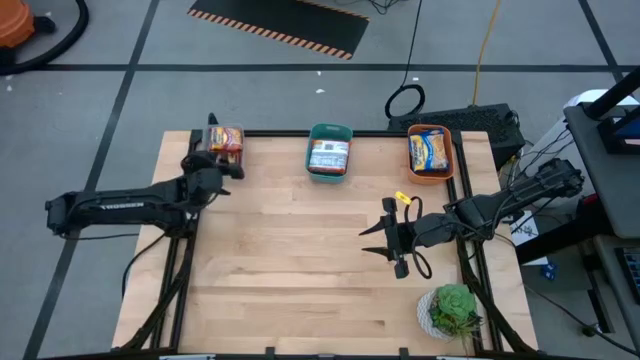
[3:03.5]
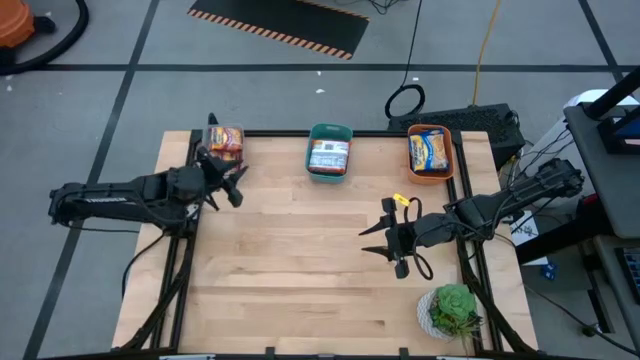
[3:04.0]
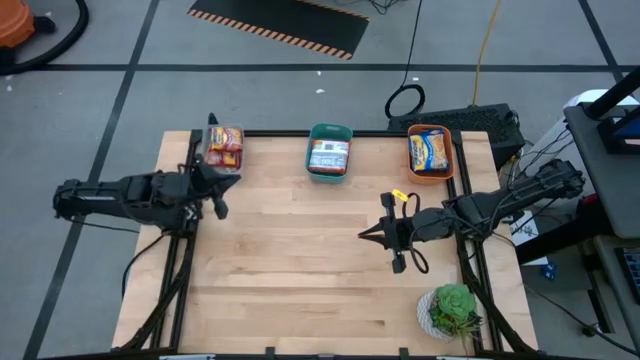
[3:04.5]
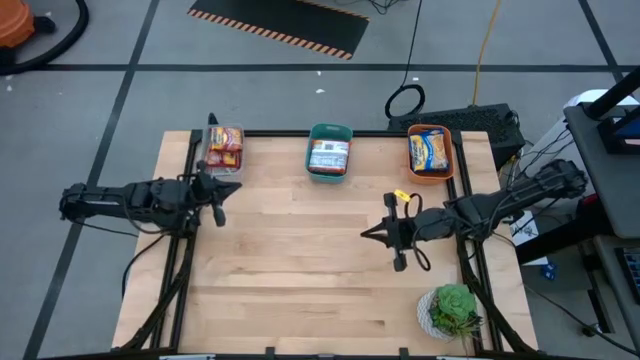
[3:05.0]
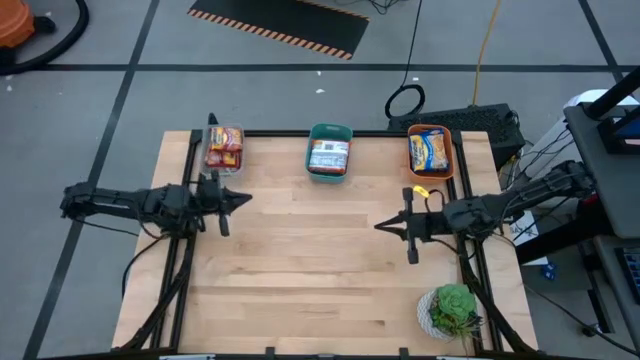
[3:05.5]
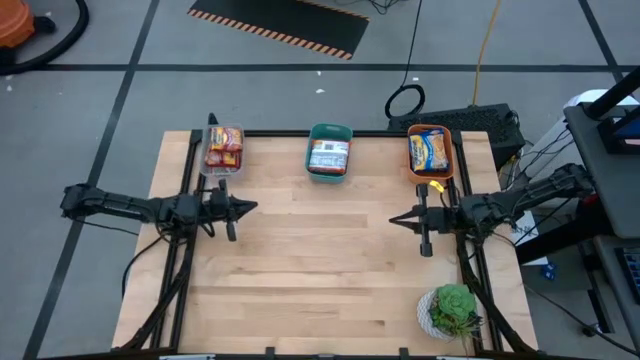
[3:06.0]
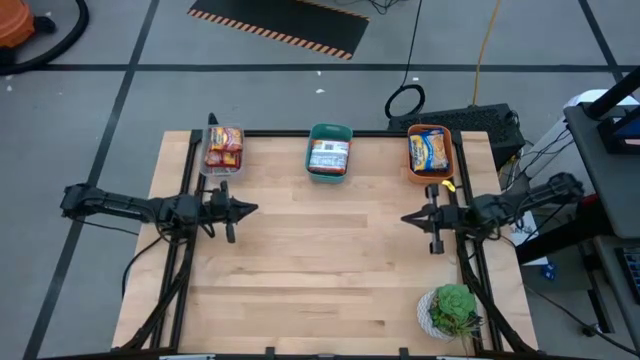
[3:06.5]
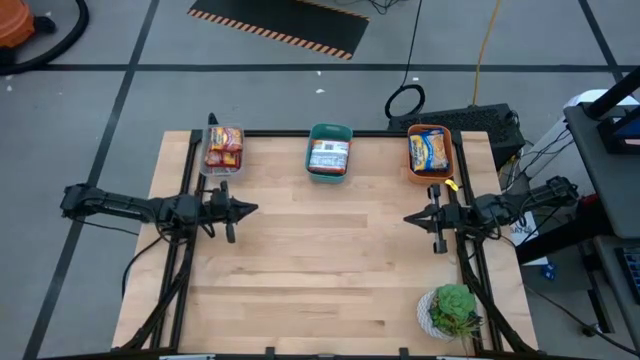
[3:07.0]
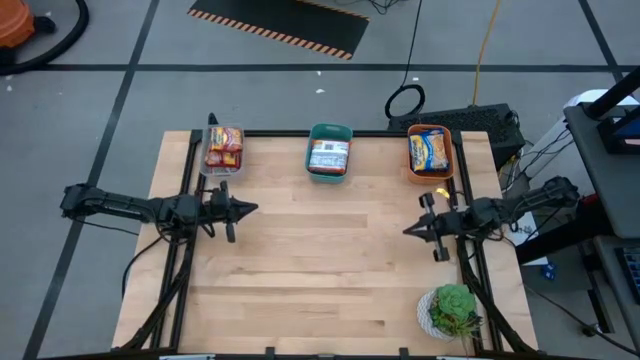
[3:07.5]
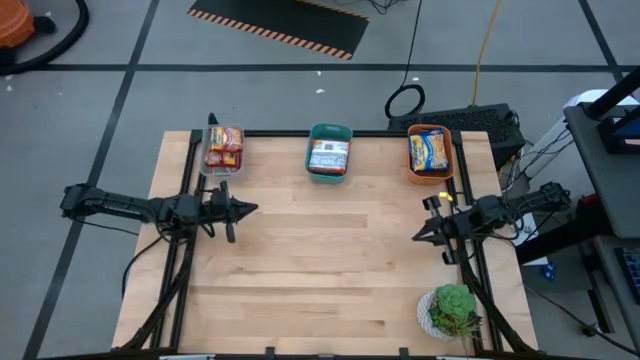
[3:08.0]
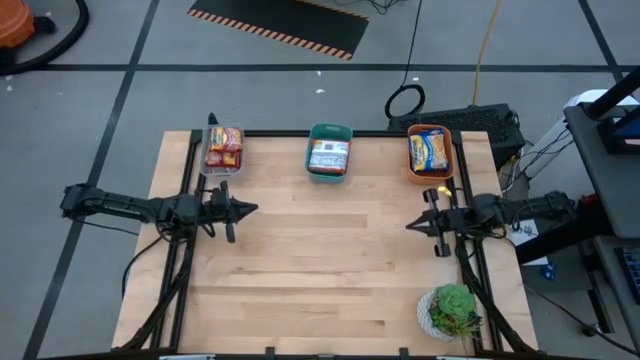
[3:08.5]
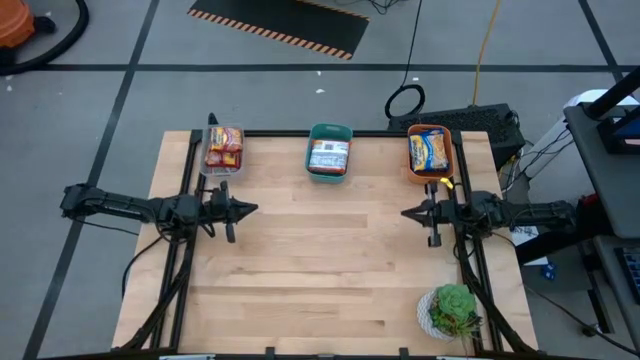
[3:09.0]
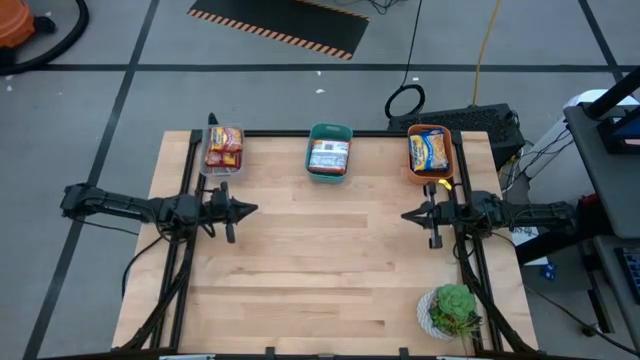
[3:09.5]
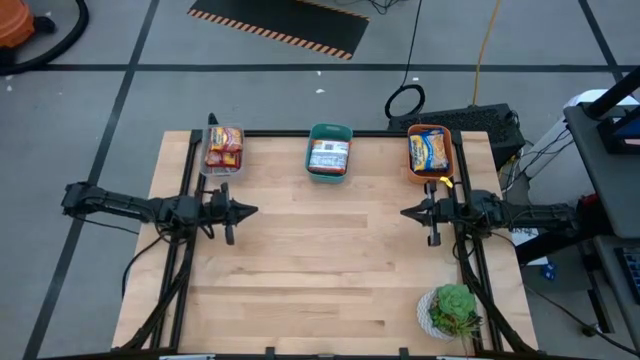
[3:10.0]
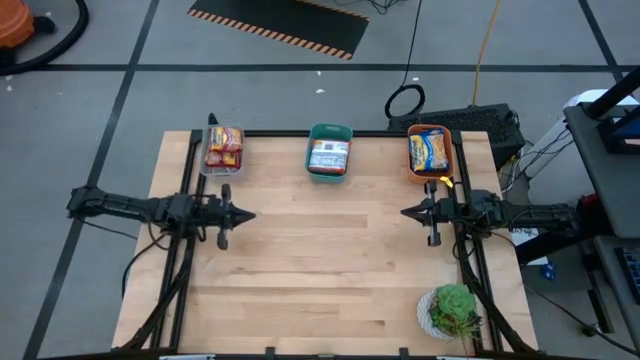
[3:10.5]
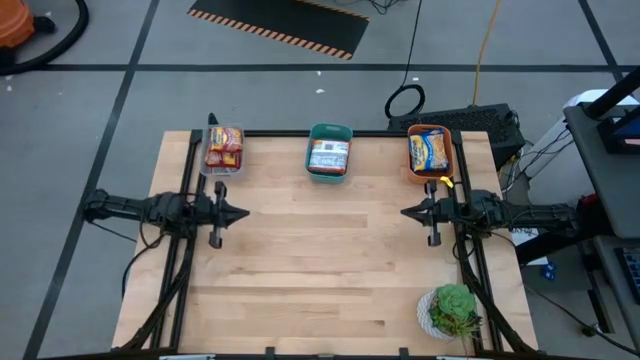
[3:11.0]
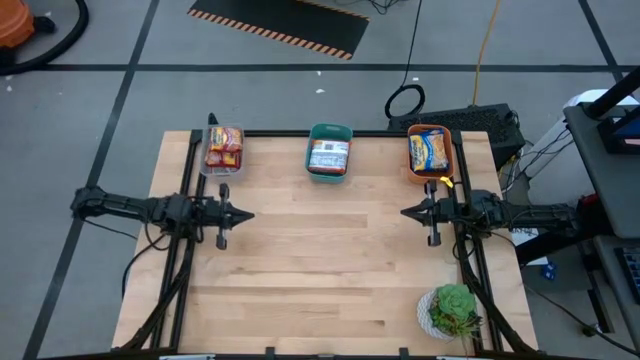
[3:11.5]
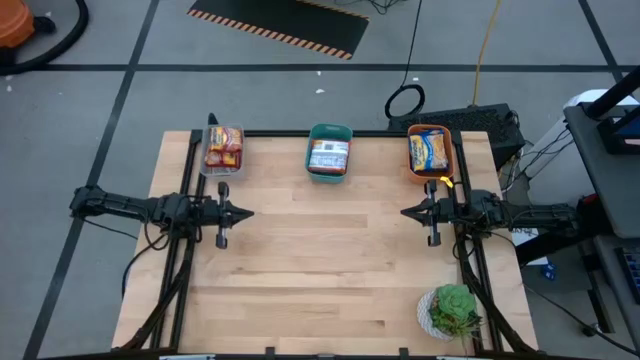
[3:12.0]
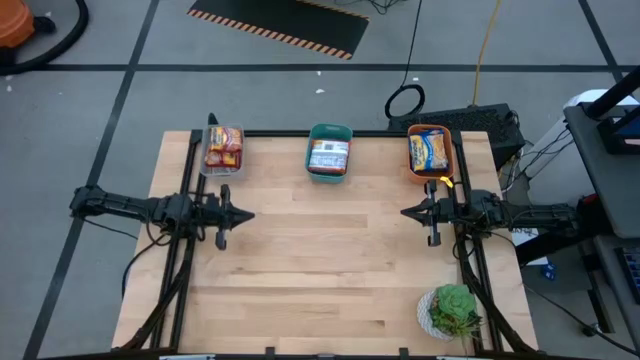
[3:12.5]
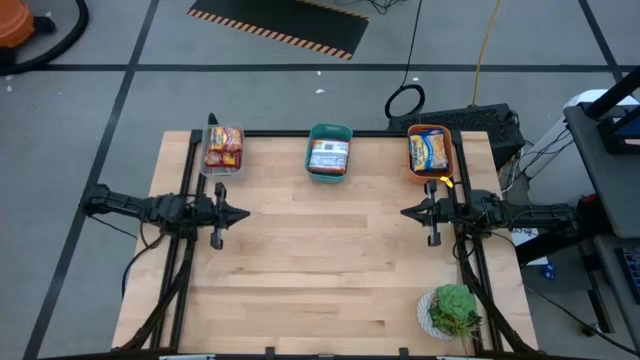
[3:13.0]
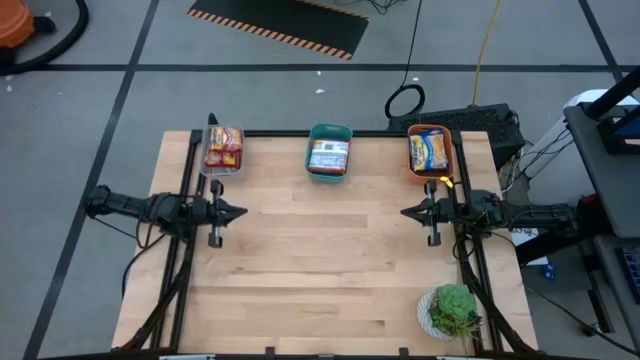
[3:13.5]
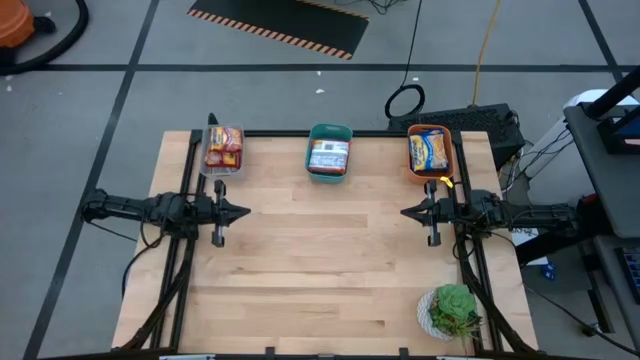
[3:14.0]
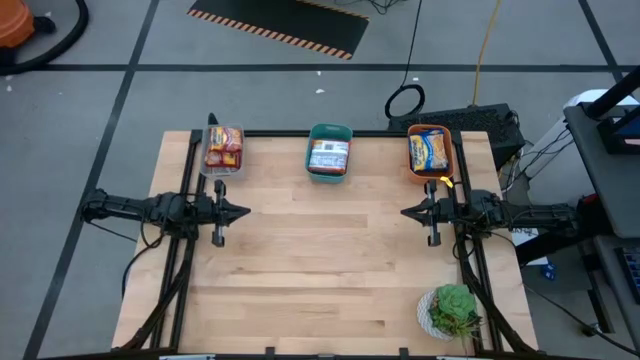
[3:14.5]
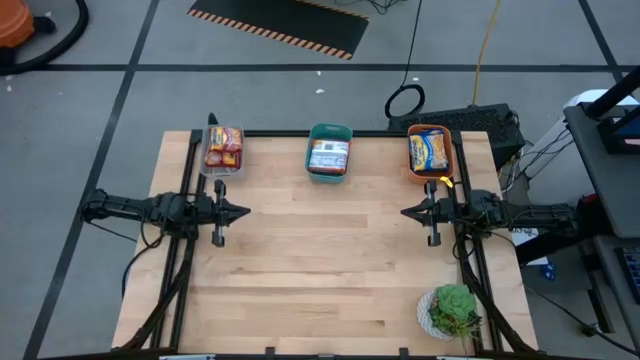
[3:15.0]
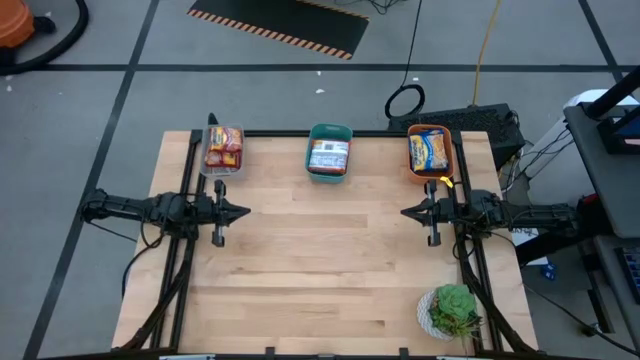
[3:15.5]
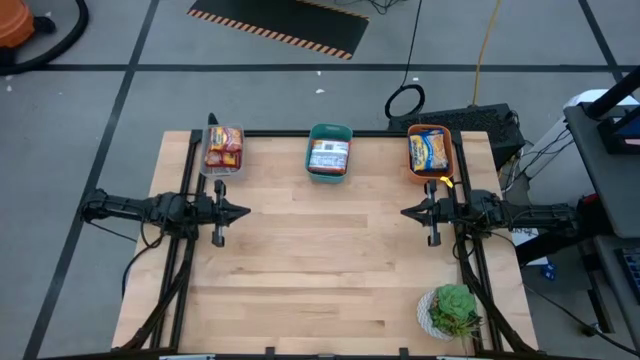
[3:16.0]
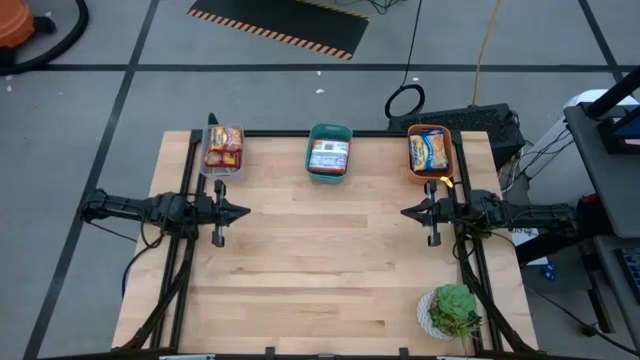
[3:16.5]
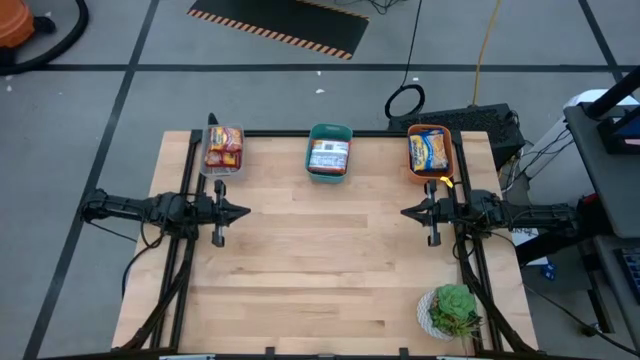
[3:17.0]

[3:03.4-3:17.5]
Task: Sort Maruchan noodles
Return to Home Position

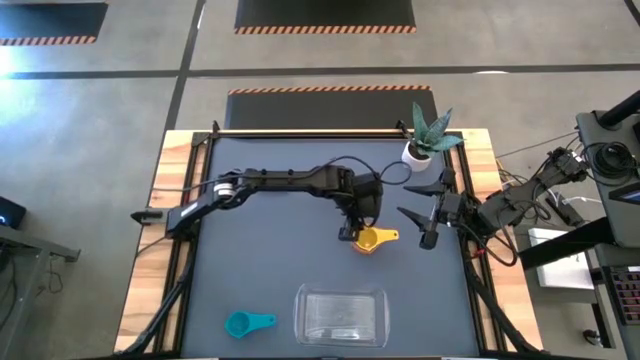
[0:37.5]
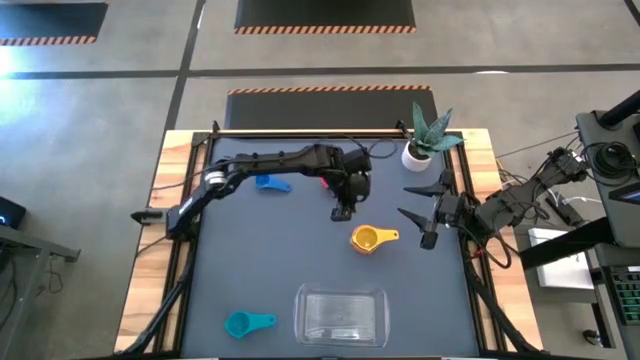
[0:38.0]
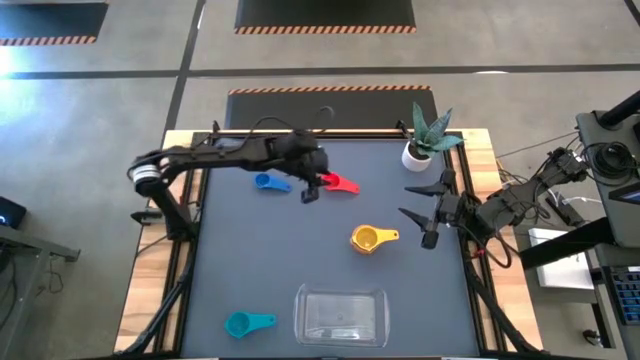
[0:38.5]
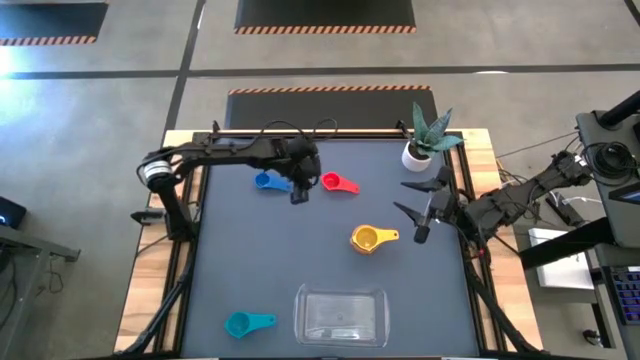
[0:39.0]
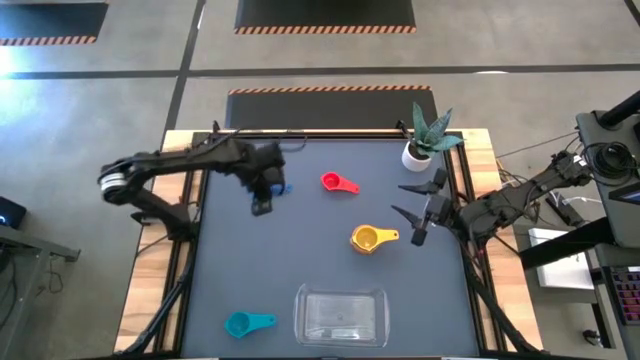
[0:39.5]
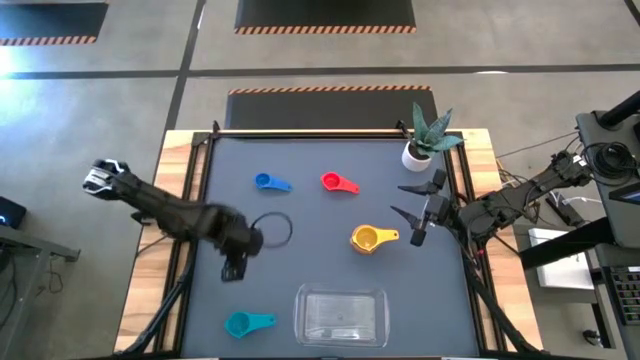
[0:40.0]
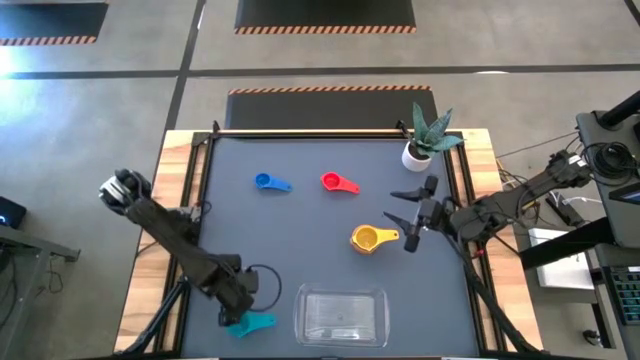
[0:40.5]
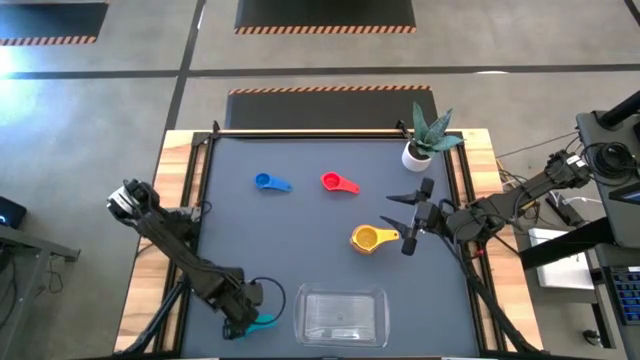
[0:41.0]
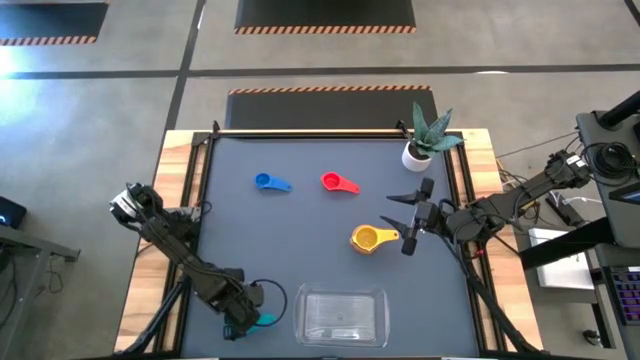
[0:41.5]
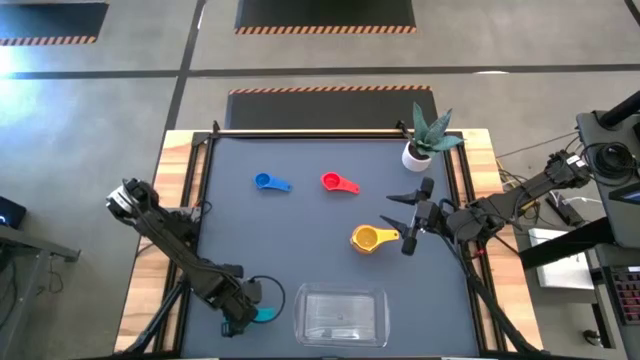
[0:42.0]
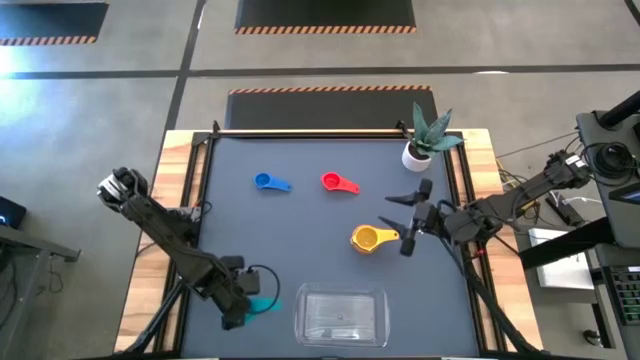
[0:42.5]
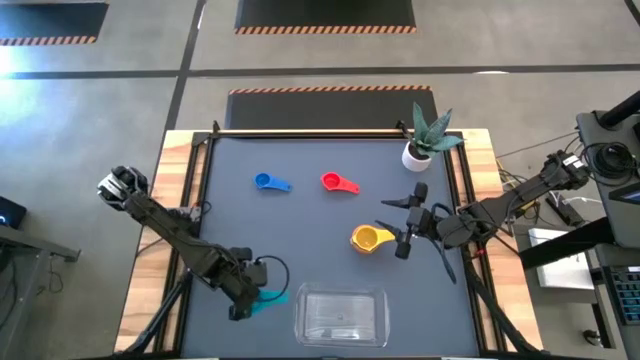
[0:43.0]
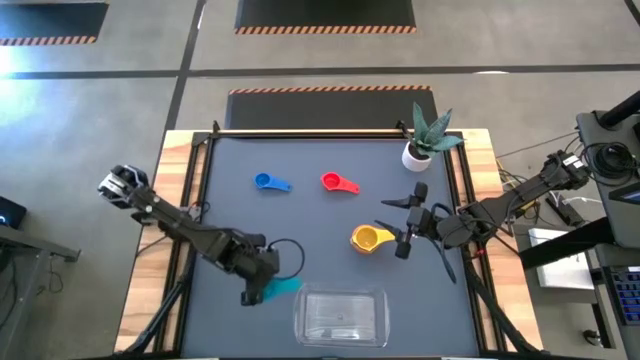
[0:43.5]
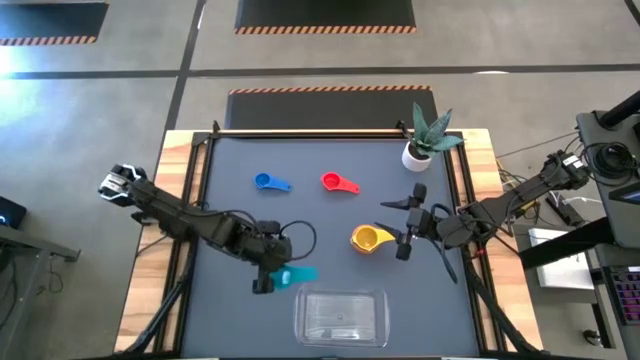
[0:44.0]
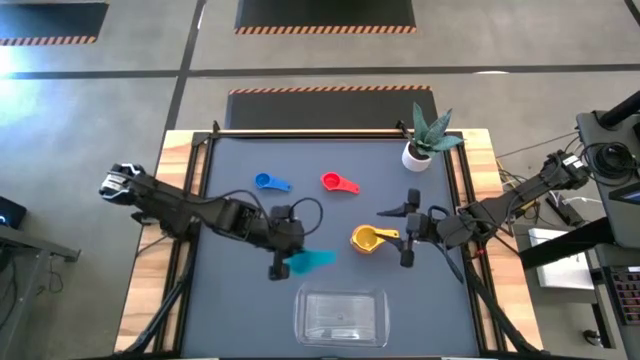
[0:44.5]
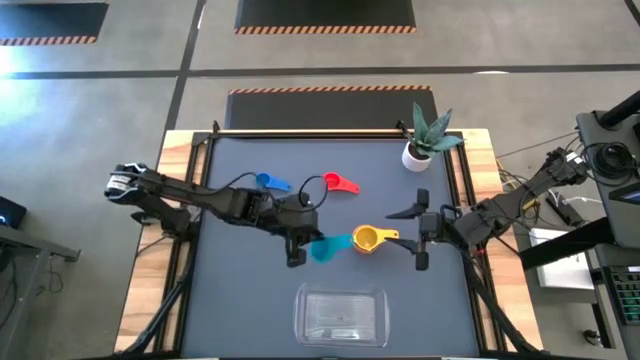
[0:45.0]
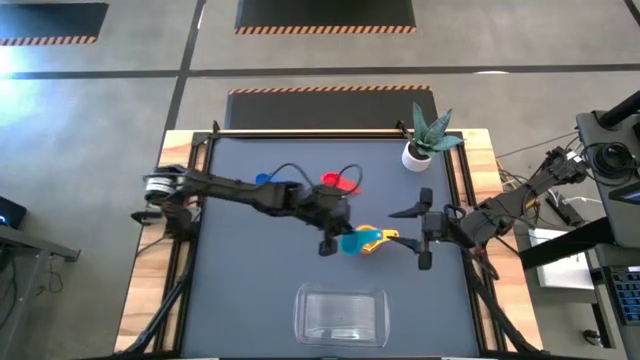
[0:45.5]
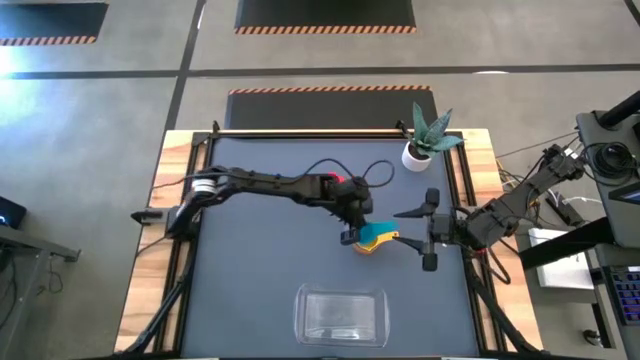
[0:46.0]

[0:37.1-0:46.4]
Task: Nest measuring cups in basket
Stack the light blue measuring cup into the yellow measuring cup
